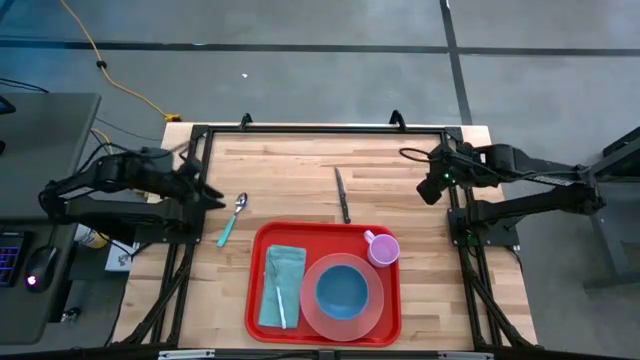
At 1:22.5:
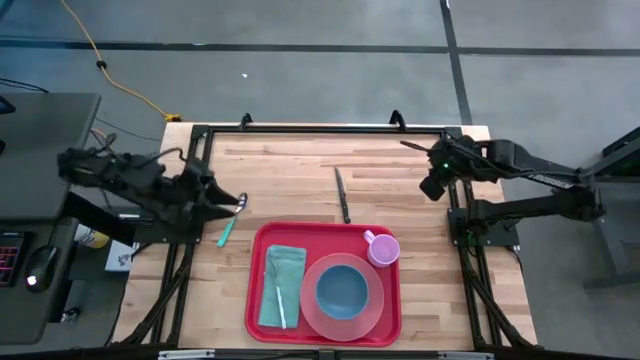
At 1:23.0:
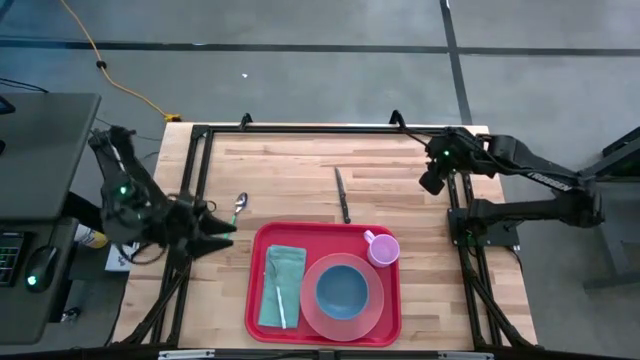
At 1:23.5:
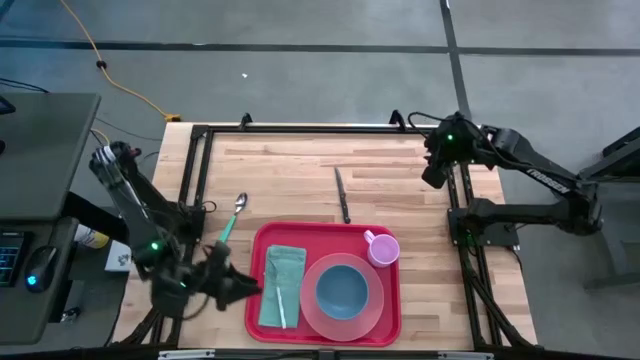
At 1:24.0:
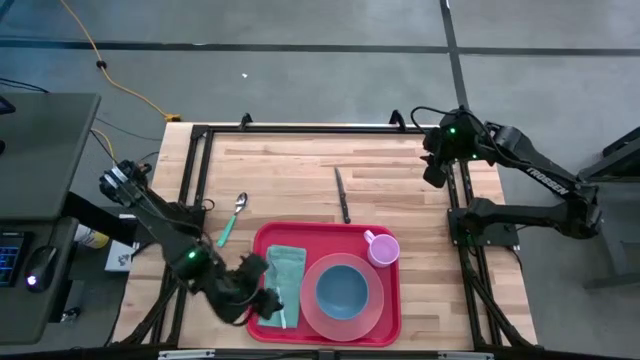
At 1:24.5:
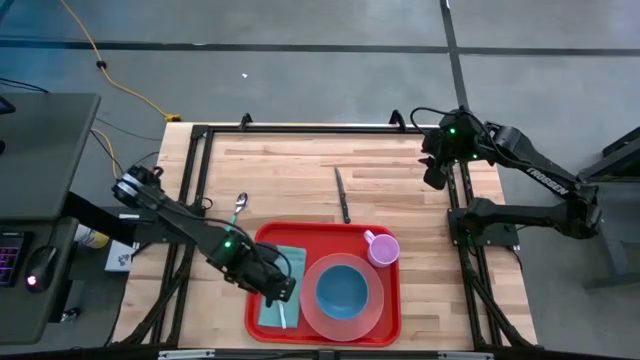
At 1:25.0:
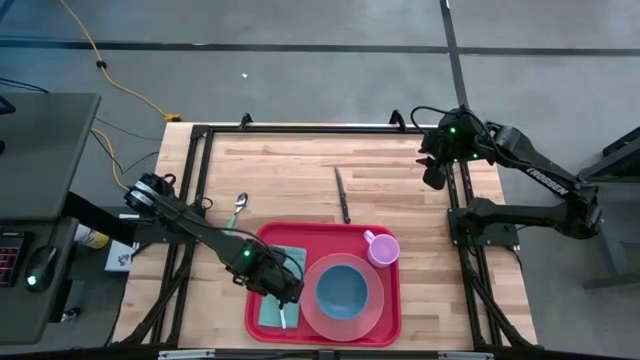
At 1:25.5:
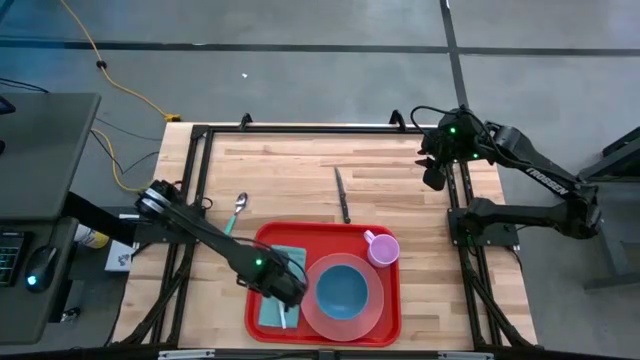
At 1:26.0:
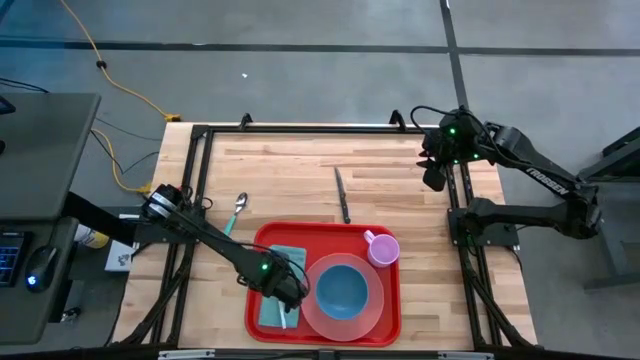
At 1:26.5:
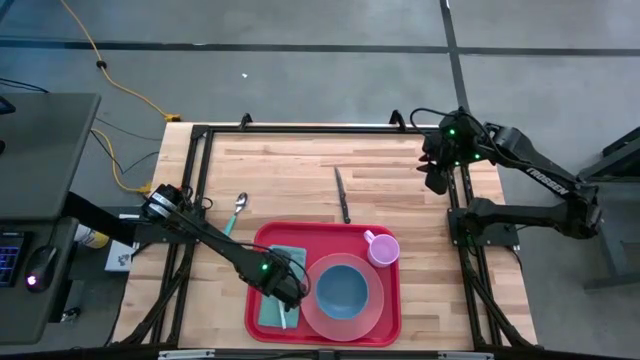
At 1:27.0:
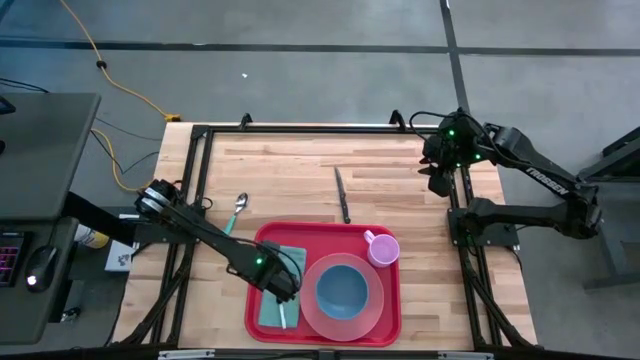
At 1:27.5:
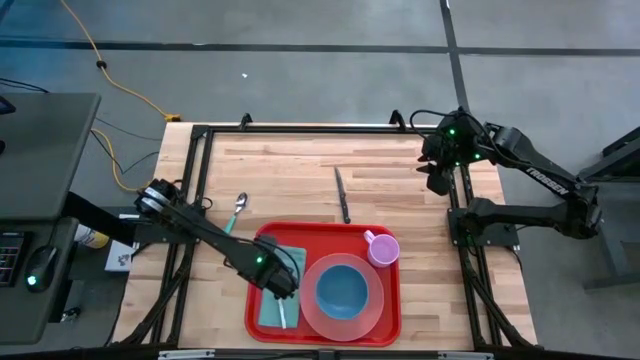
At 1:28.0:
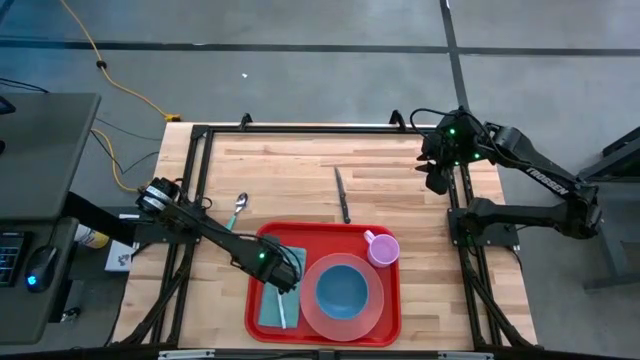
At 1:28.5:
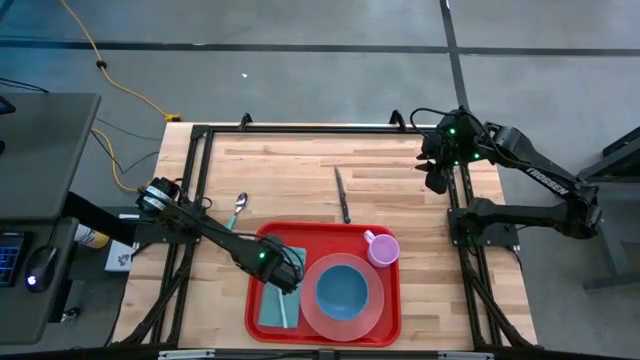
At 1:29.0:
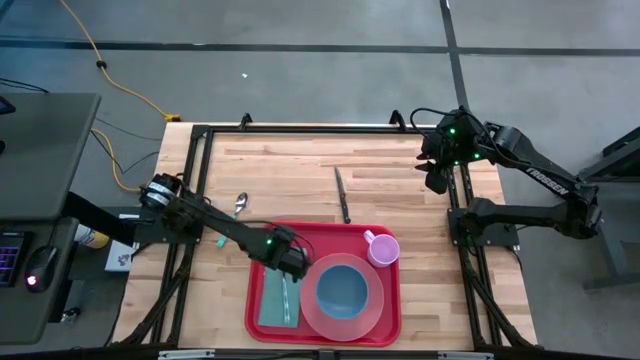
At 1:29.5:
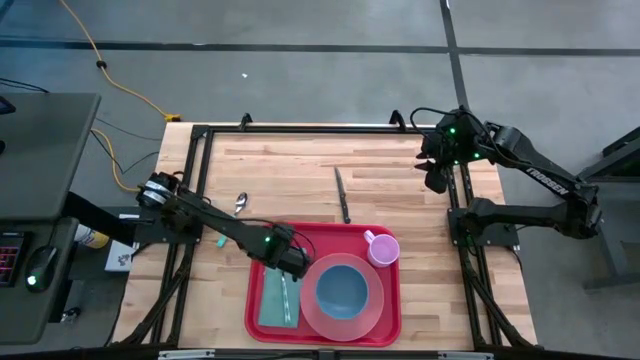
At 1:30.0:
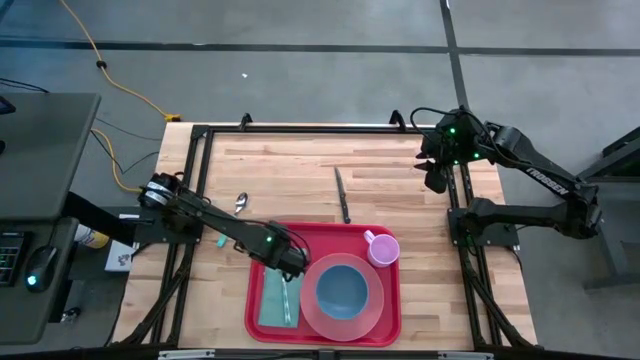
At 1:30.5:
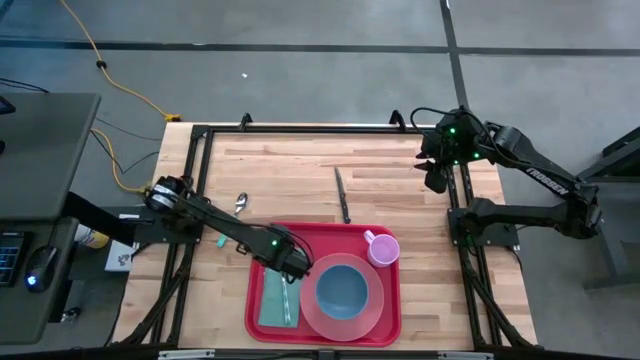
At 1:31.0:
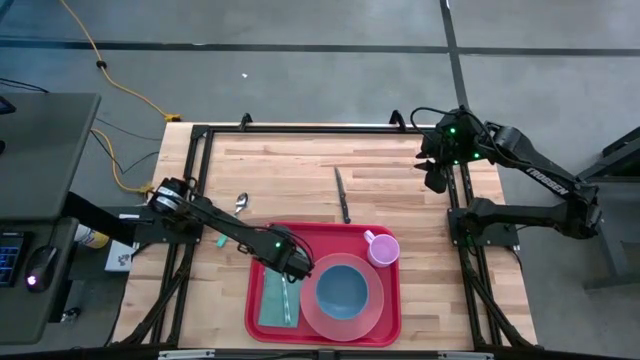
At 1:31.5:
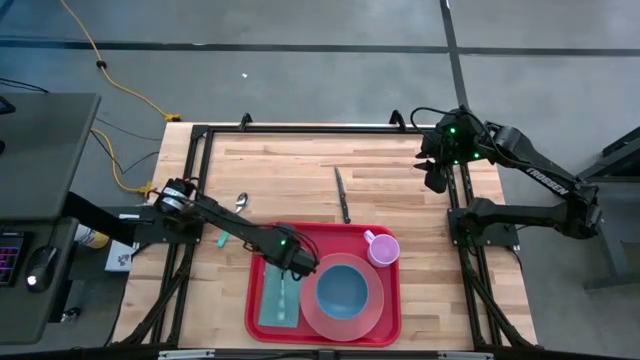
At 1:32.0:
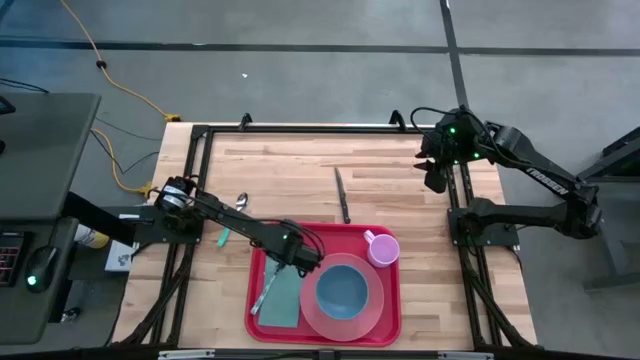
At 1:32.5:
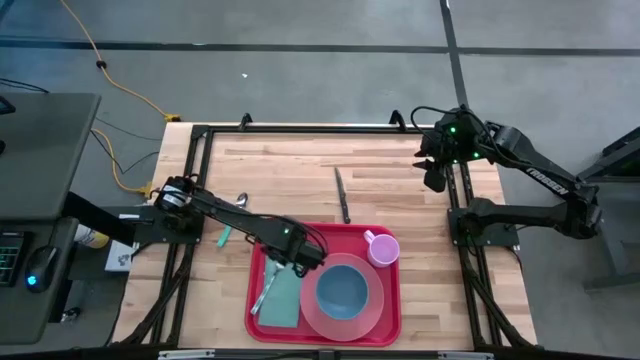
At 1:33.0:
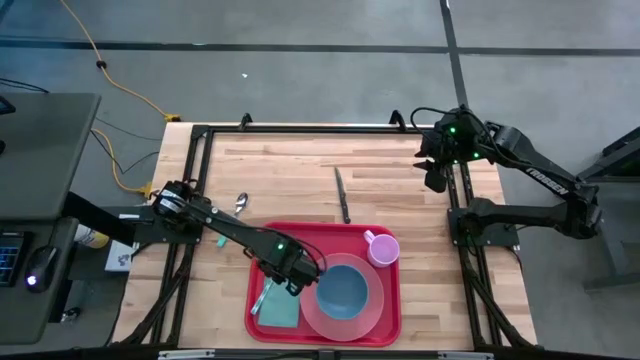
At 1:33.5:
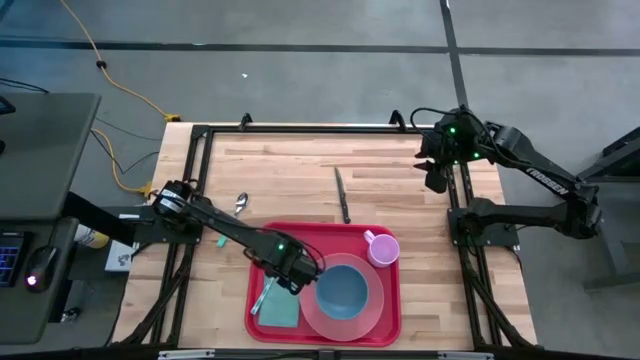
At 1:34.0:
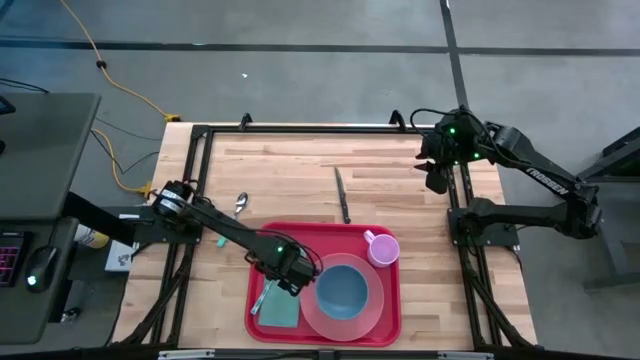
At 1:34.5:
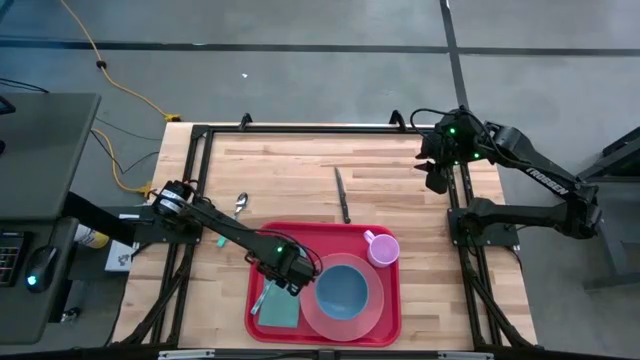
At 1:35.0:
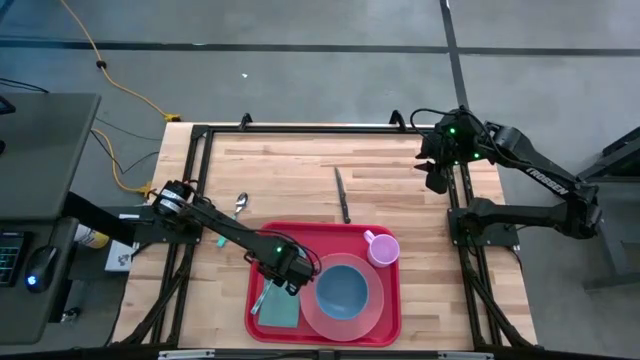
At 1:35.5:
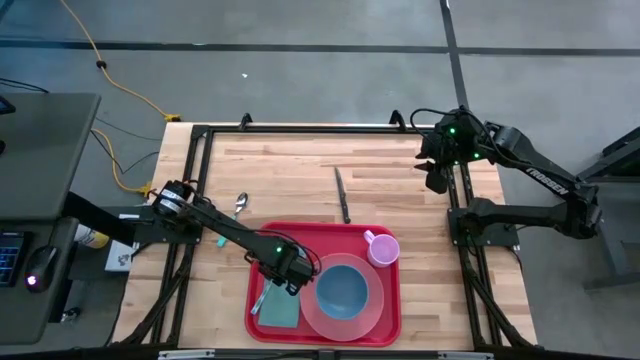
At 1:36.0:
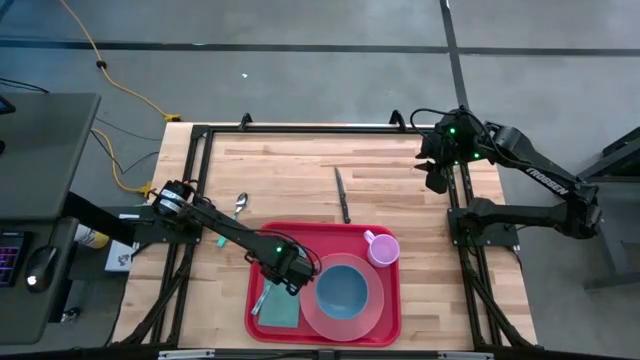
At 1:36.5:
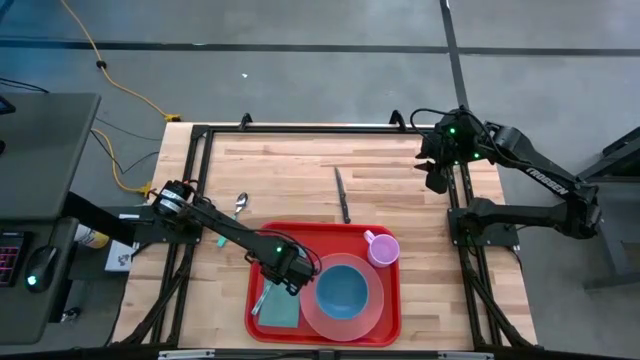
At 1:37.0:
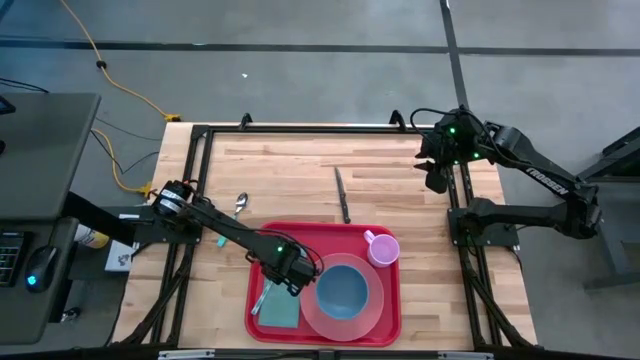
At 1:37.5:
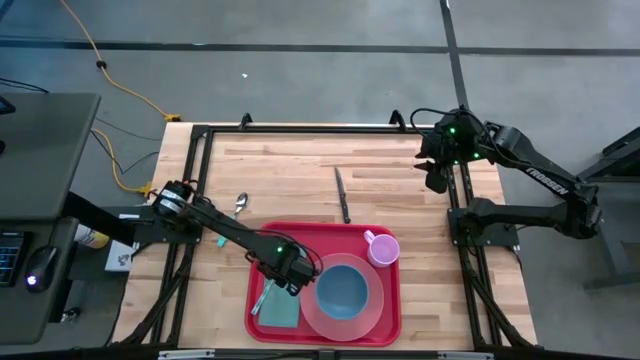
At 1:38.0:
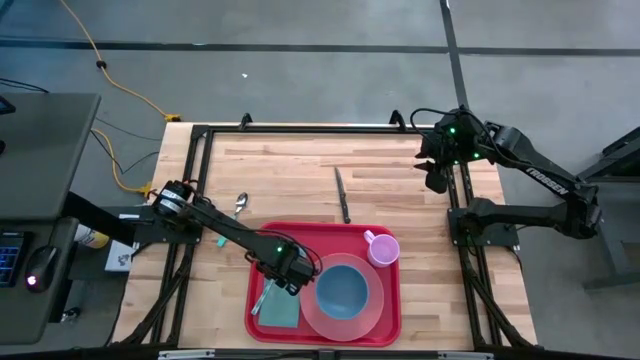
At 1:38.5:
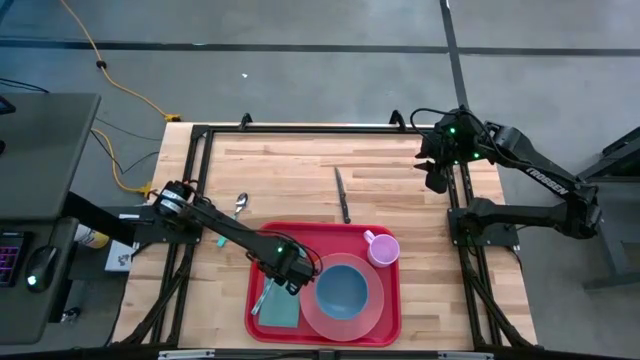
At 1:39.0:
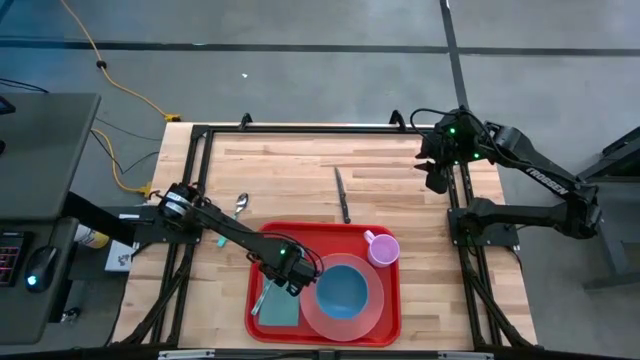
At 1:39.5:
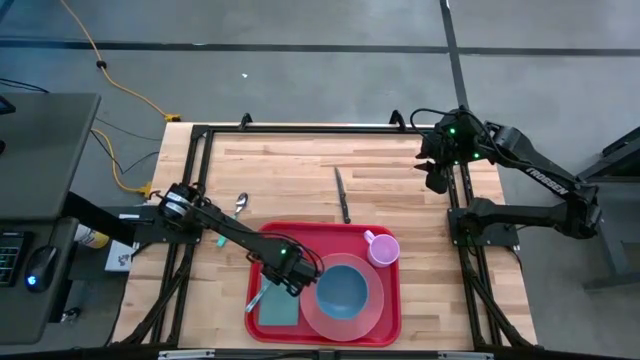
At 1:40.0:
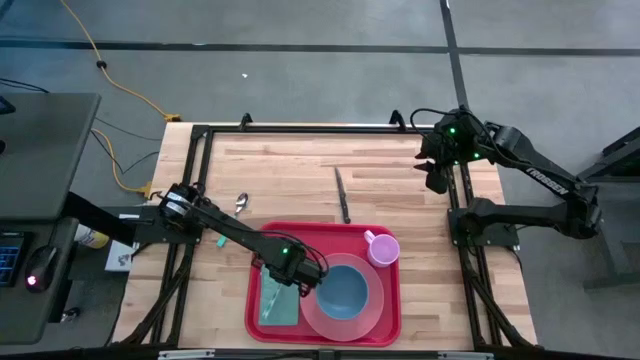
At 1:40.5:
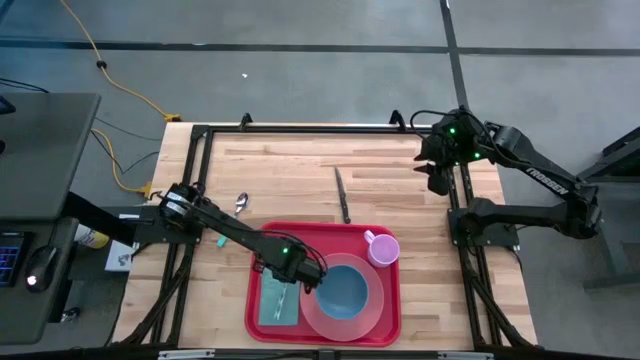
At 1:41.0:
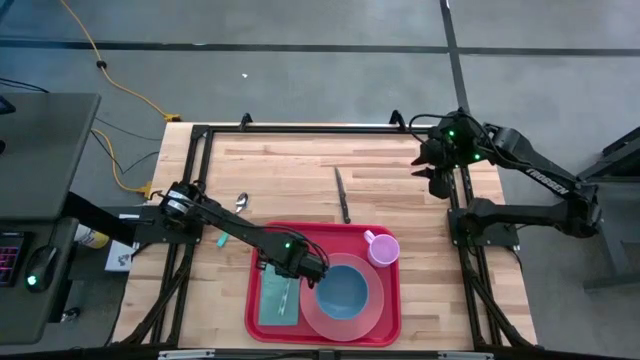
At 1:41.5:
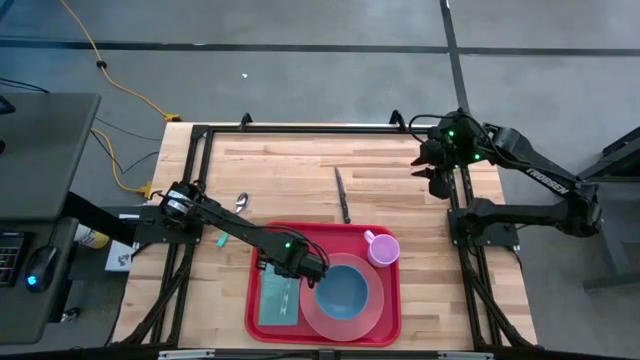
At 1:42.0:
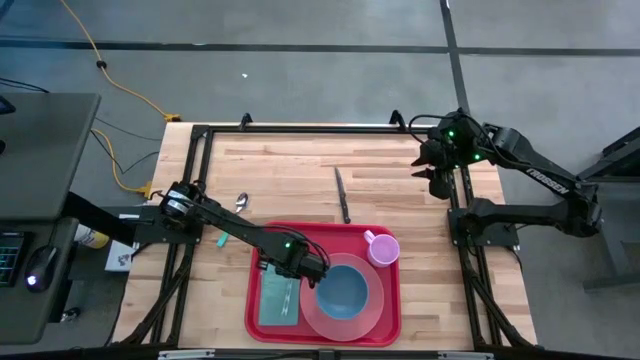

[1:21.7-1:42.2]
Task: Set up tray
Put the blue patterned fork on the blue napkin

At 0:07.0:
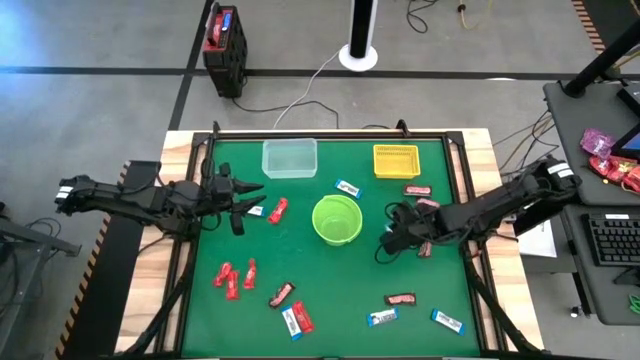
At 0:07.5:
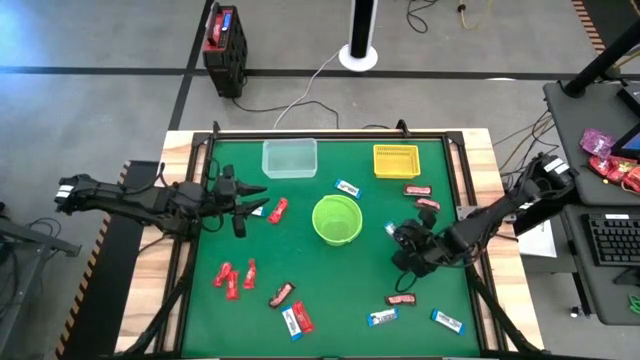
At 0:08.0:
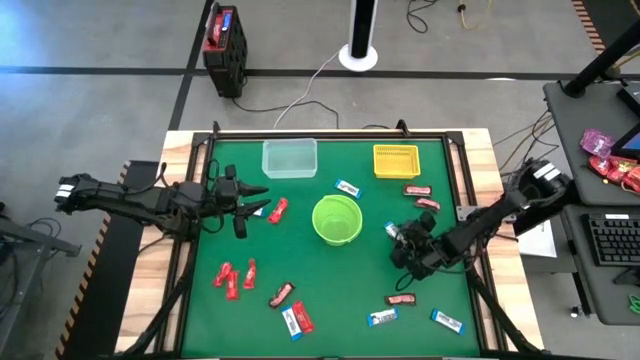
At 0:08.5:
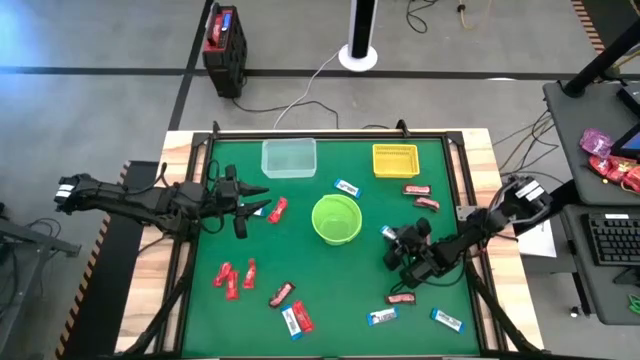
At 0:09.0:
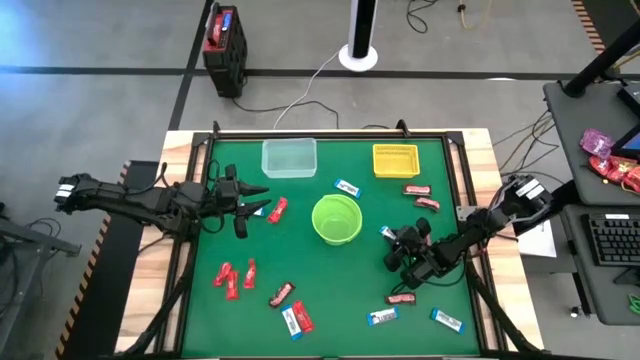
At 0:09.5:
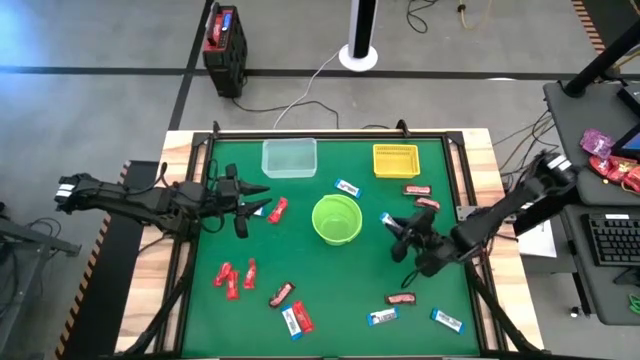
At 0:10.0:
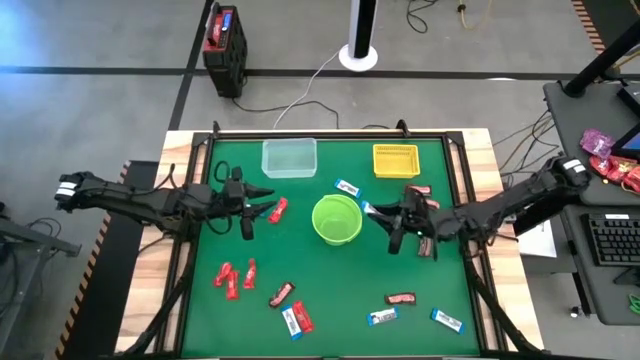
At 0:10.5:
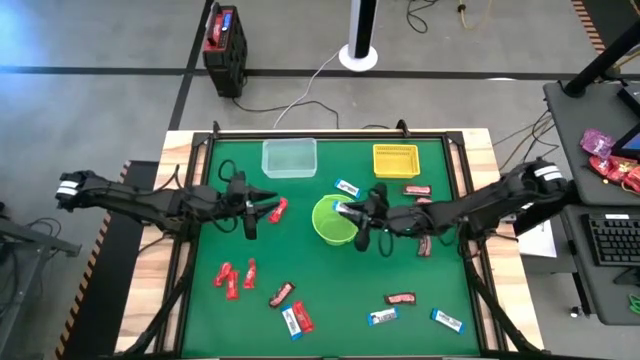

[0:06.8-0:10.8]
Task: Sort candy by brand, put in halloween buckets
Put the white chocolate into the green bucket
